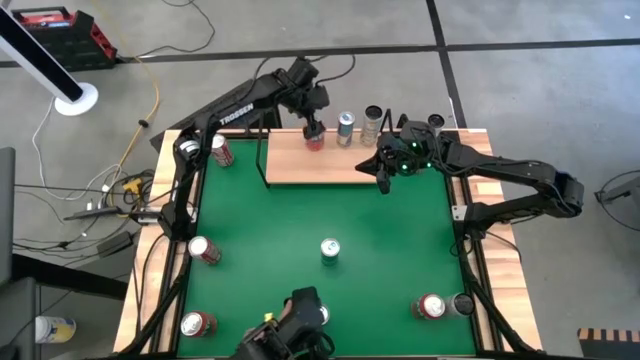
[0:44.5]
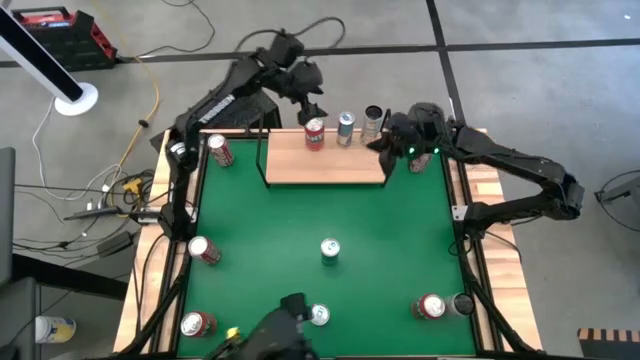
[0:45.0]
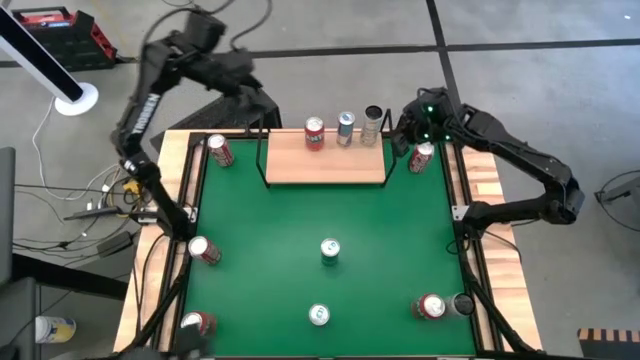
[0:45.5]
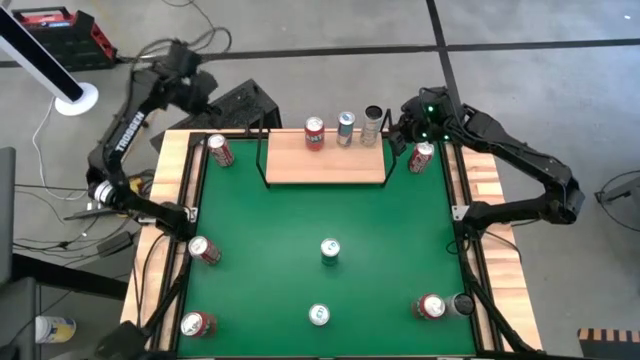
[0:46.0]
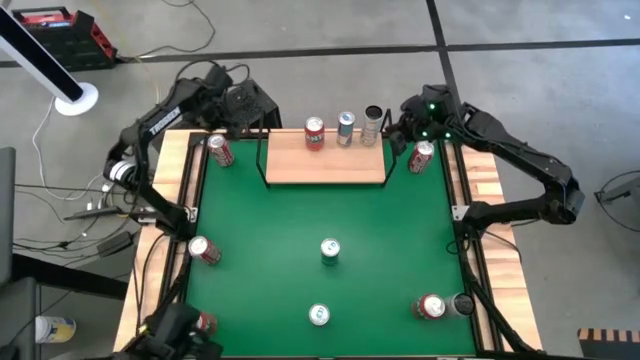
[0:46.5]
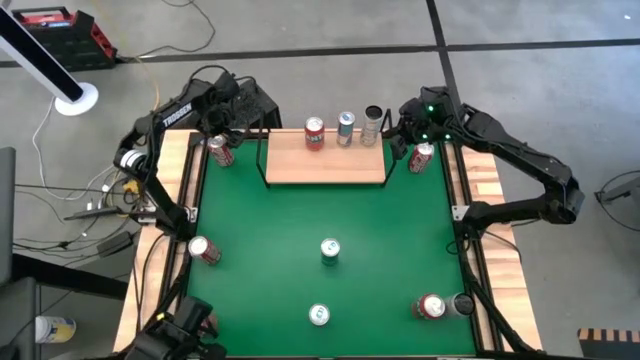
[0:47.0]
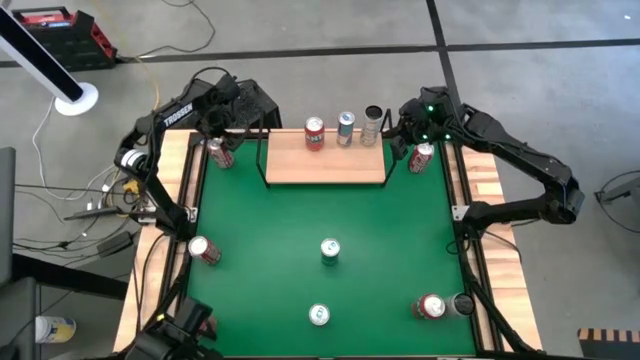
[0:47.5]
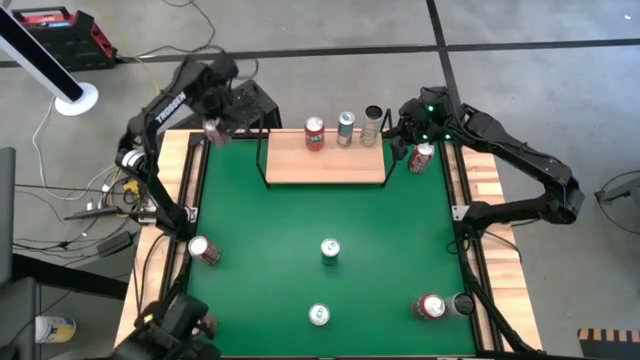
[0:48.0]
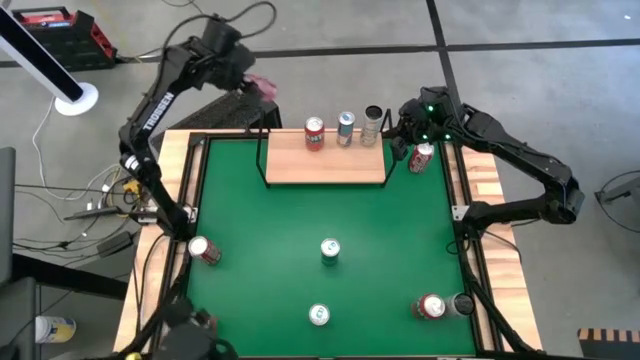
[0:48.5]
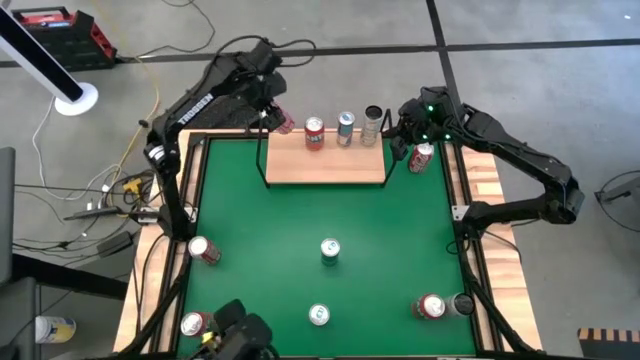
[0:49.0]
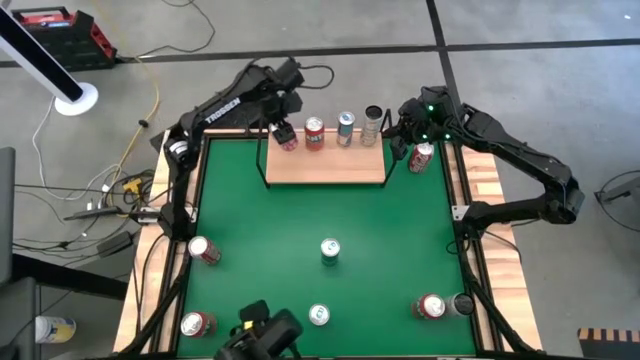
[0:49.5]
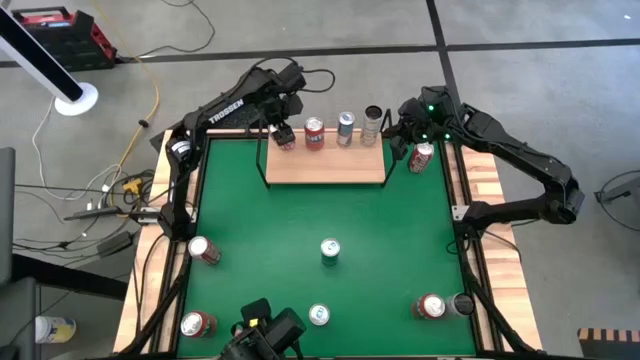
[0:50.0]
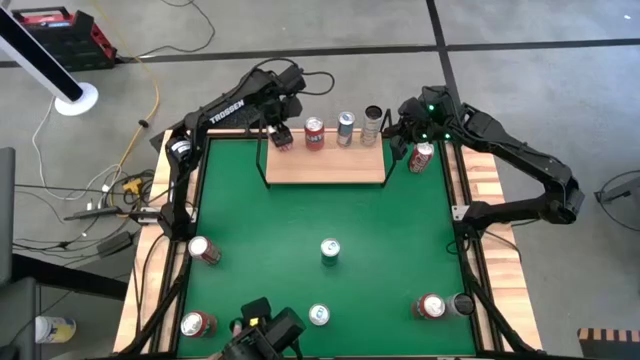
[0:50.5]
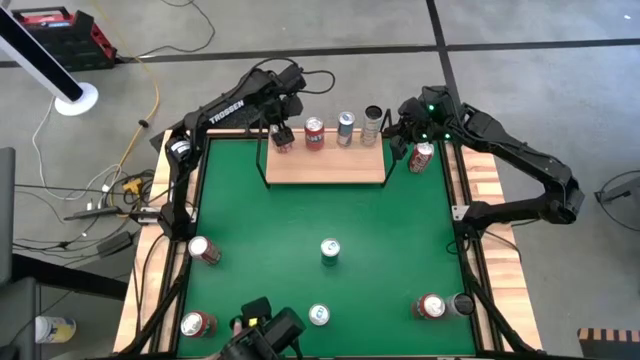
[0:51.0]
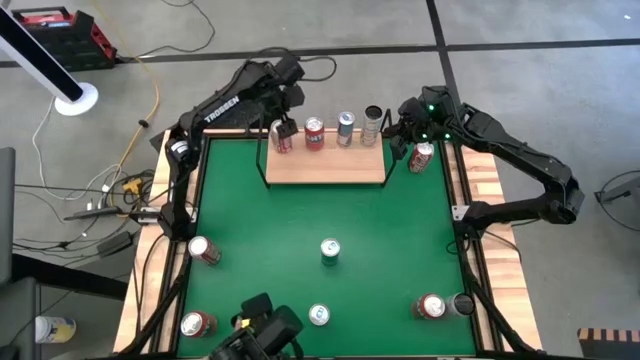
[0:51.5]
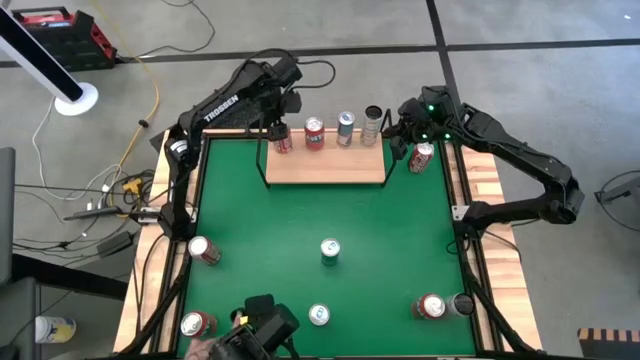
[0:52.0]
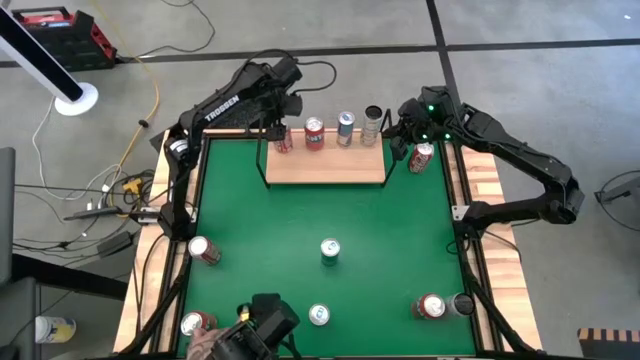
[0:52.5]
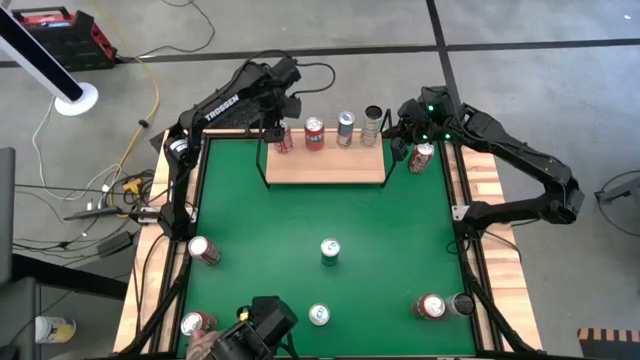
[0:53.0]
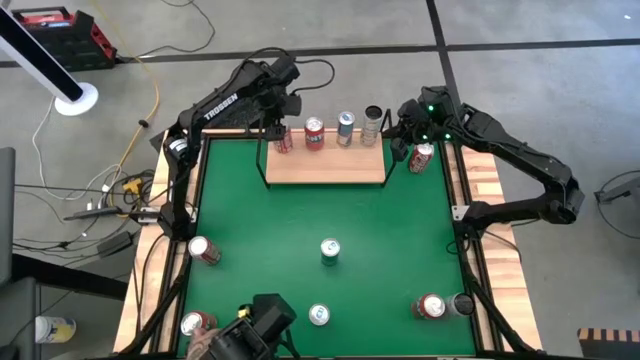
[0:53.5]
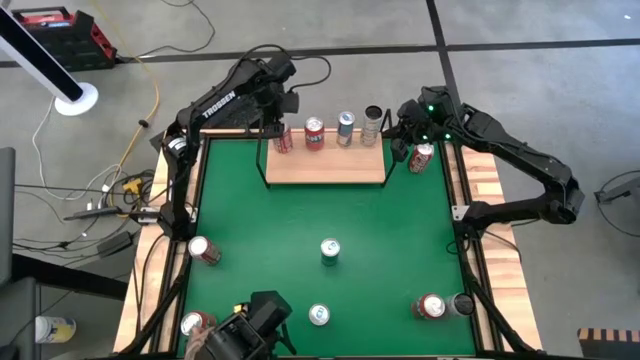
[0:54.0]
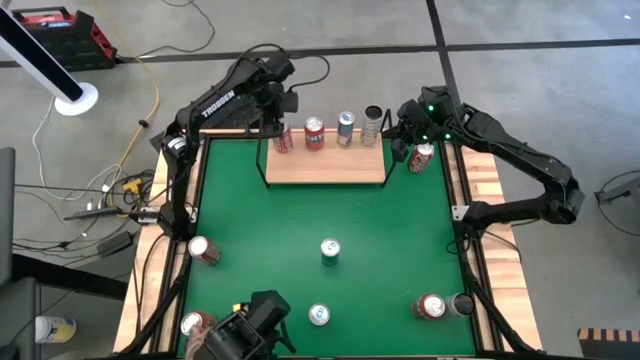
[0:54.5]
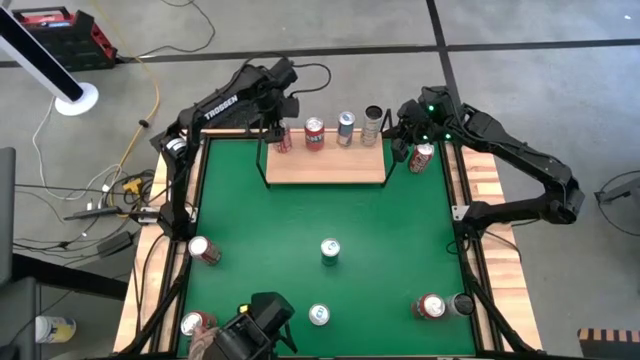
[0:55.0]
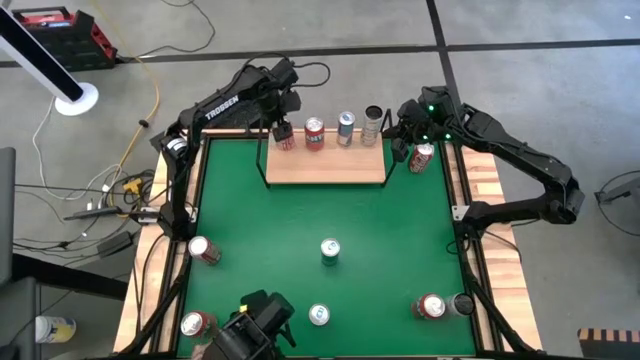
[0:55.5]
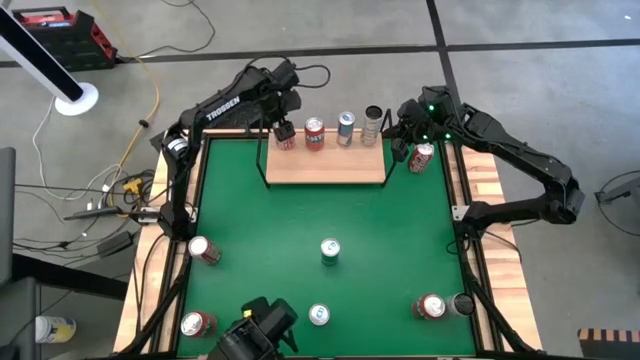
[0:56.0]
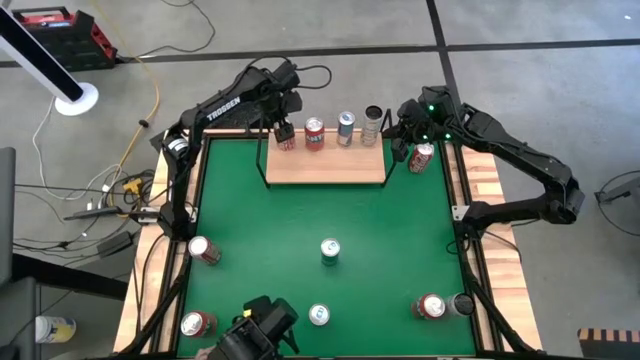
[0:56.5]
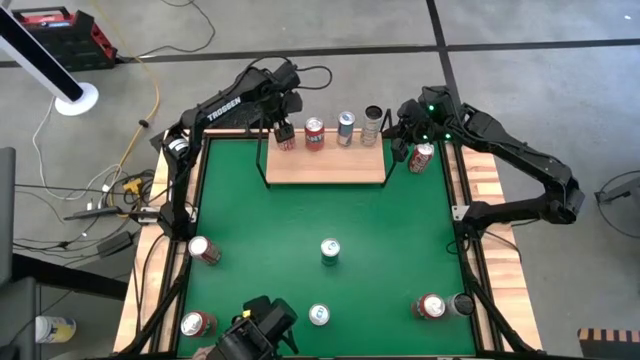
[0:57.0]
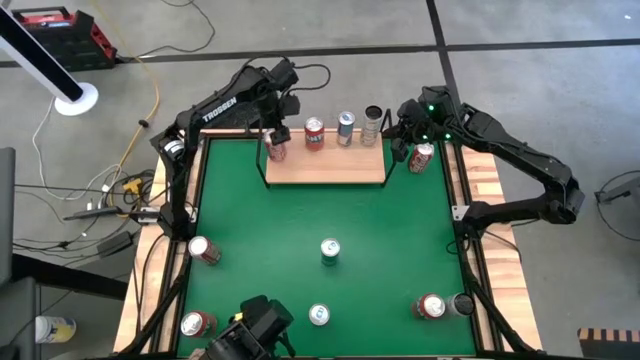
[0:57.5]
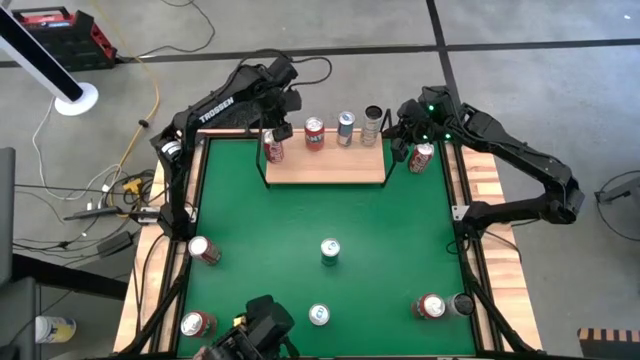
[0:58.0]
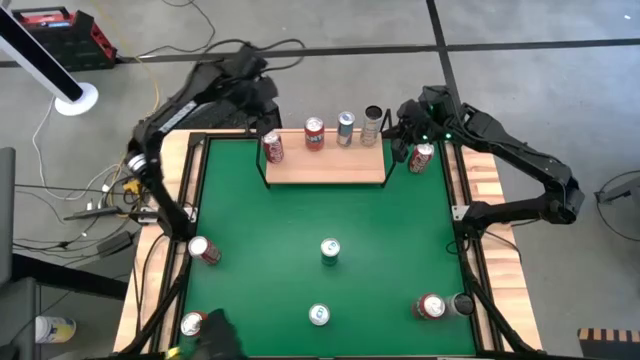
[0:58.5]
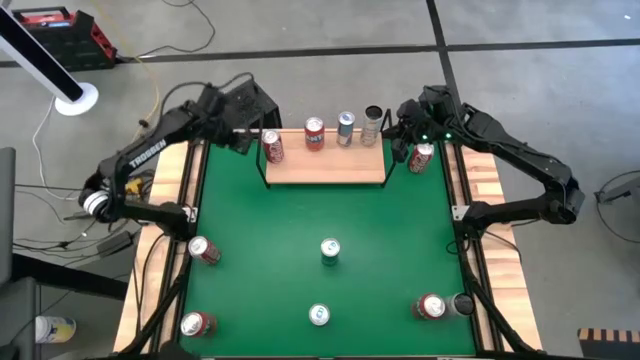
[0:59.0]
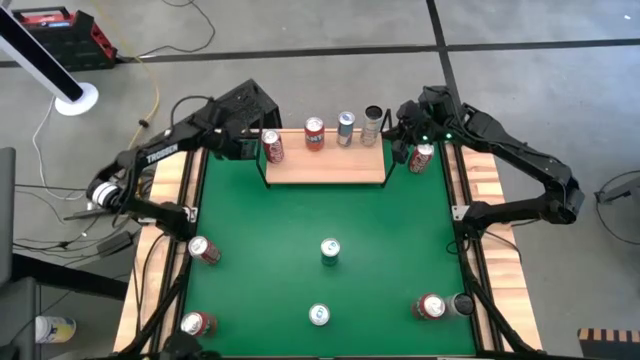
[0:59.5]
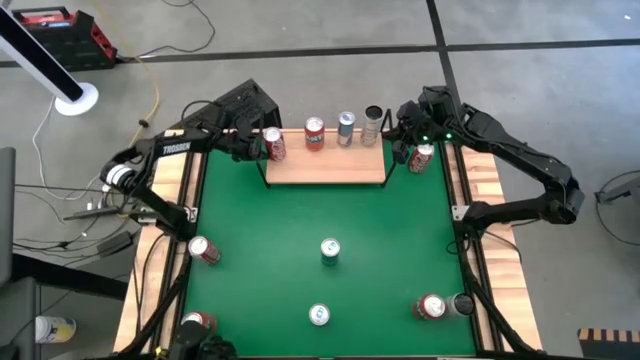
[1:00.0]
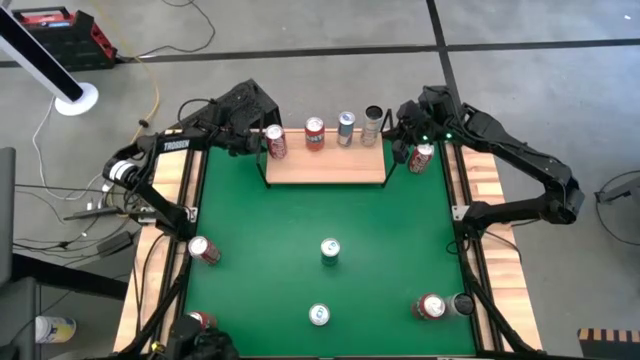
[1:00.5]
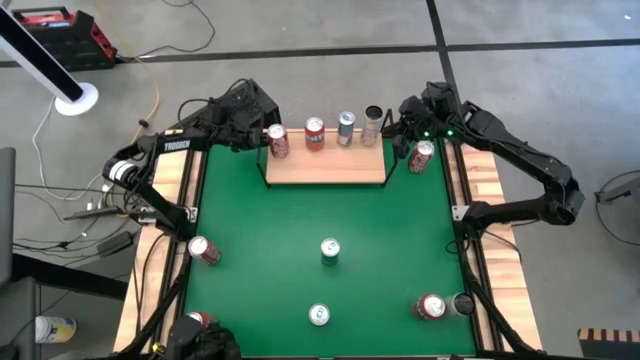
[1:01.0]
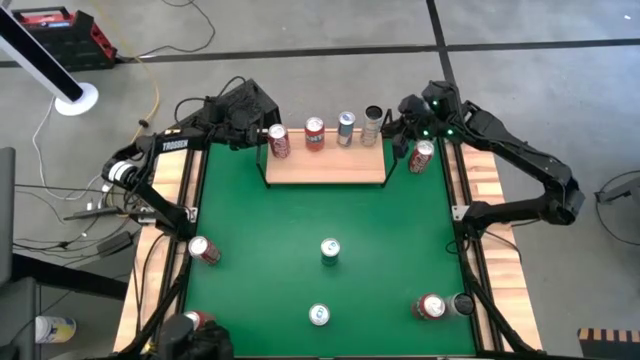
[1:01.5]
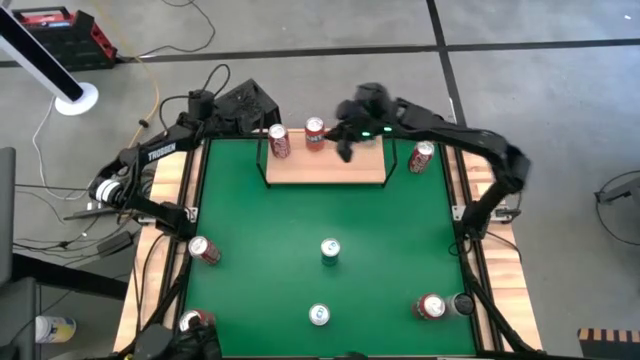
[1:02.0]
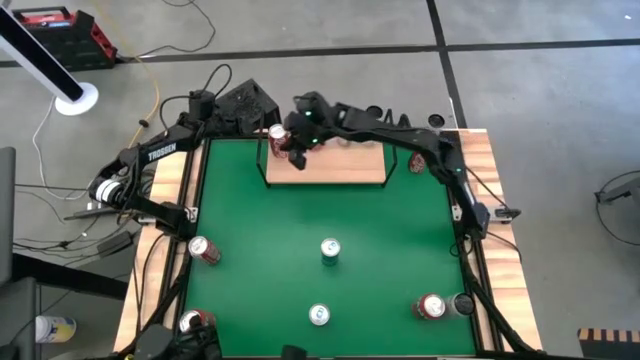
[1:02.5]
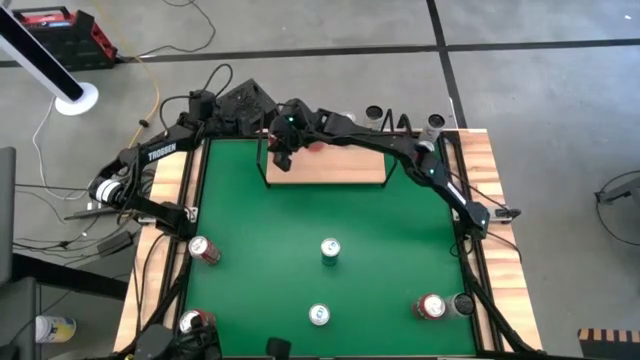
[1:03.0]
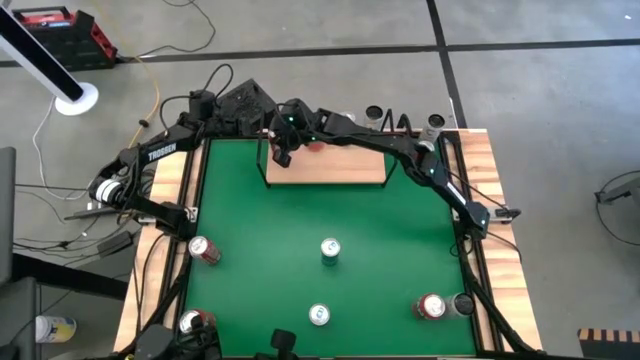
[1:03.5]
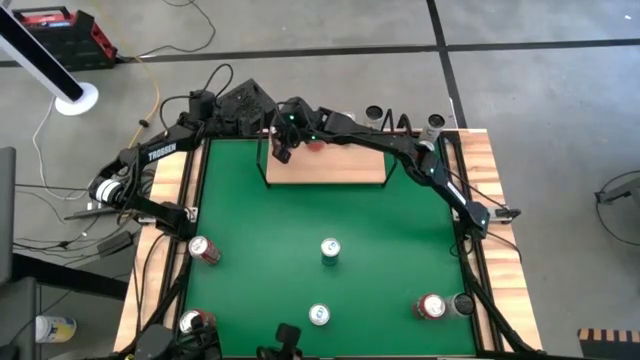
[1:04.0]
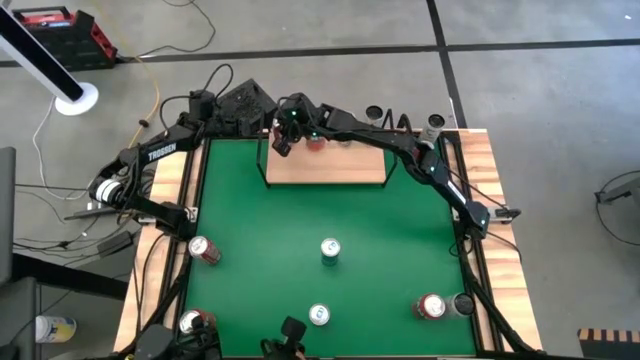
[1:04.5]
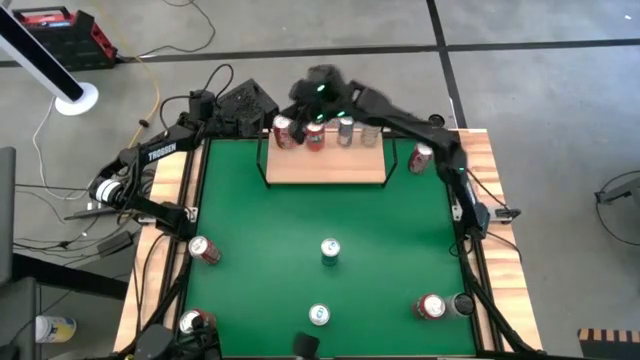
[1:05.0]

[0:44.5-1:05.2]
Task: Place canned beverage on shelf
Put the top left red soda can on the shelf
